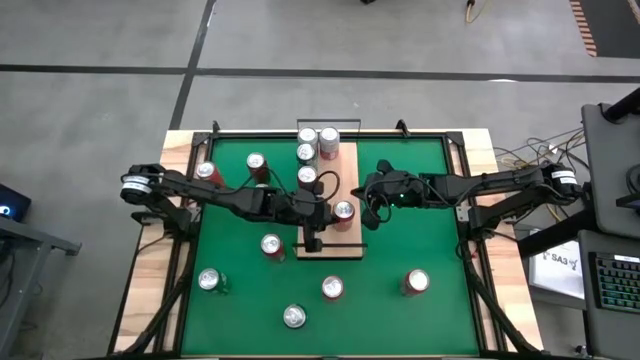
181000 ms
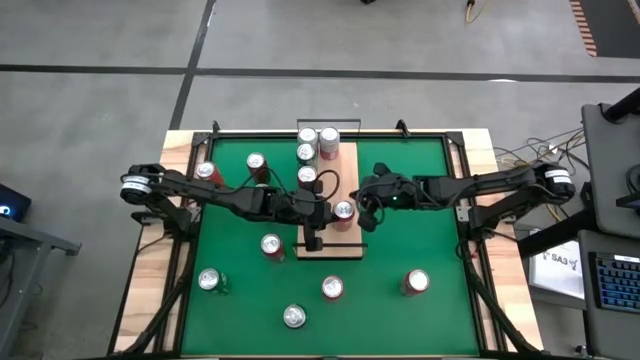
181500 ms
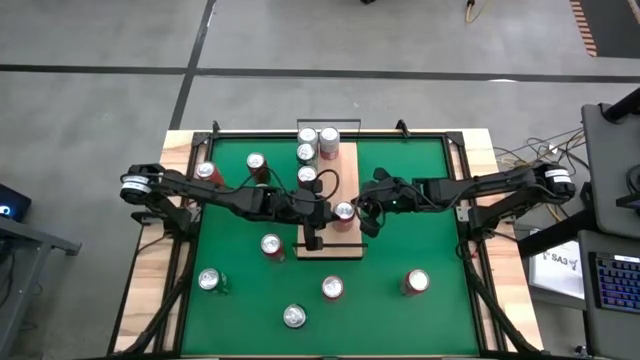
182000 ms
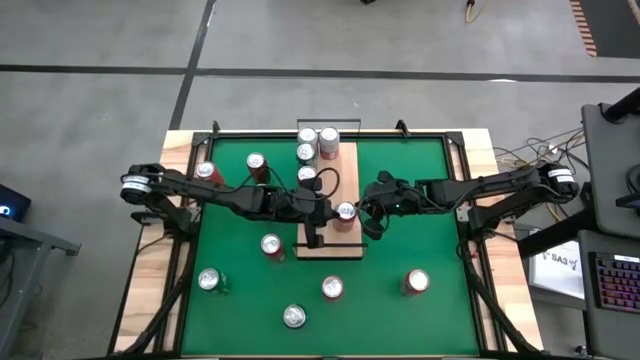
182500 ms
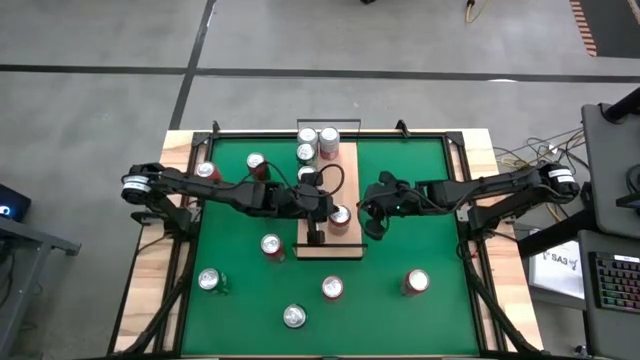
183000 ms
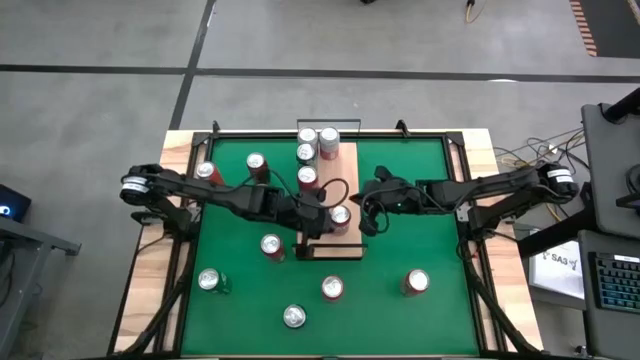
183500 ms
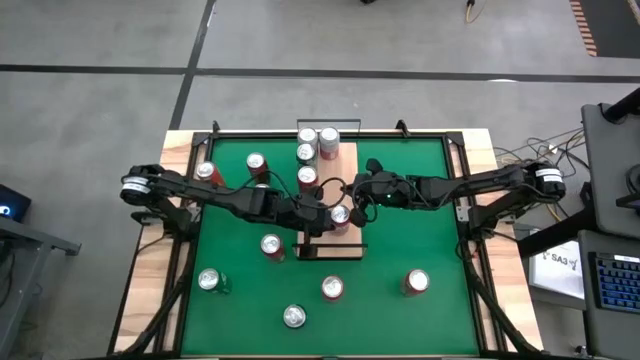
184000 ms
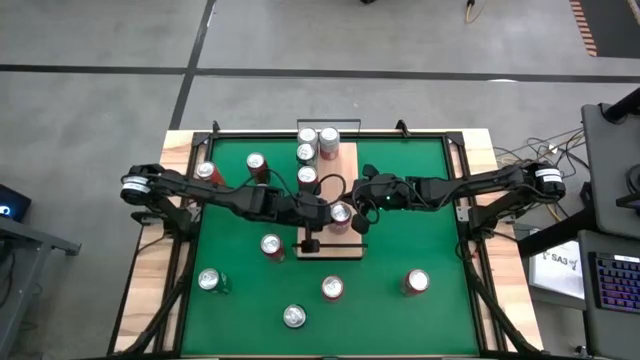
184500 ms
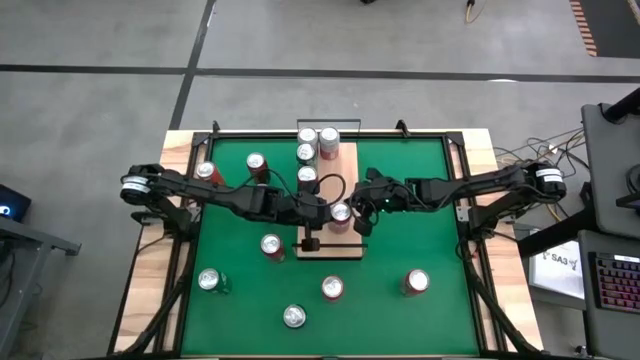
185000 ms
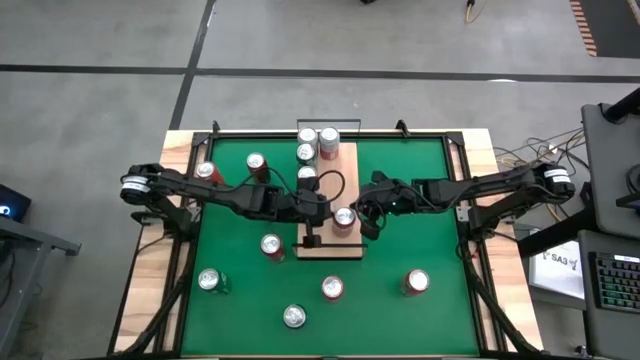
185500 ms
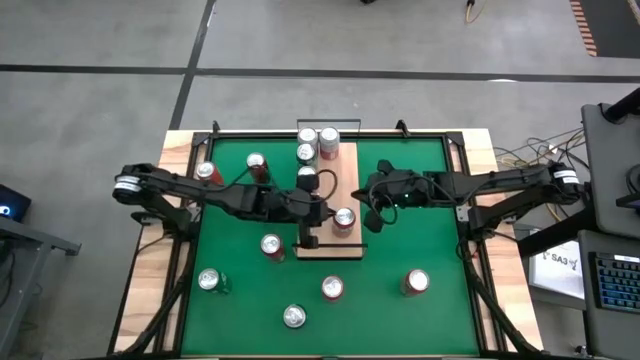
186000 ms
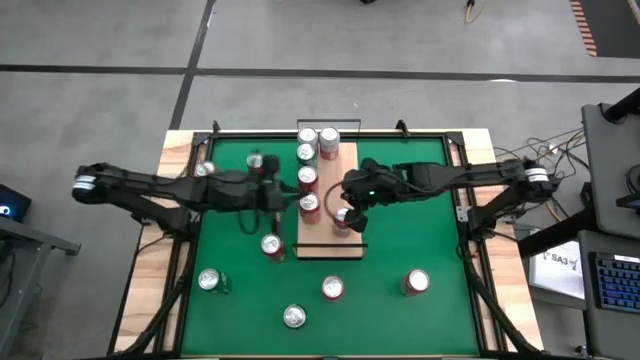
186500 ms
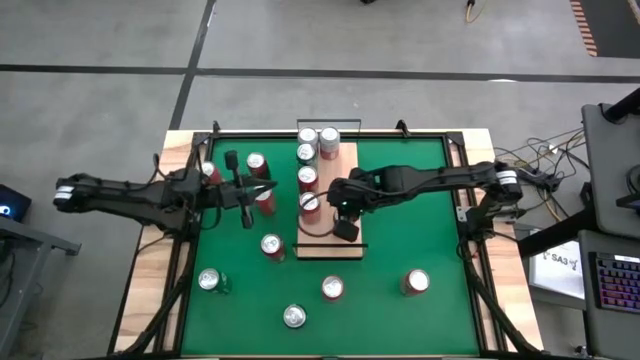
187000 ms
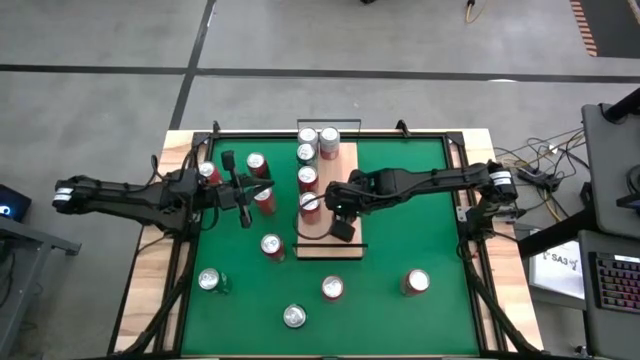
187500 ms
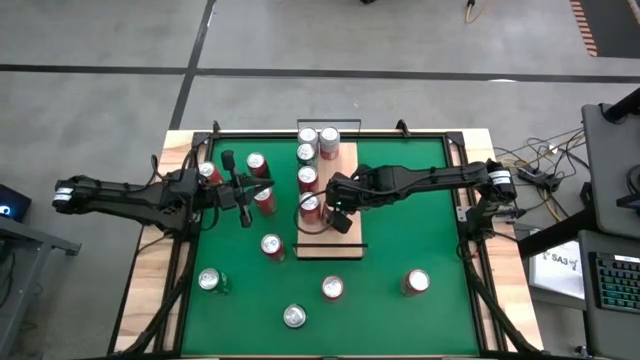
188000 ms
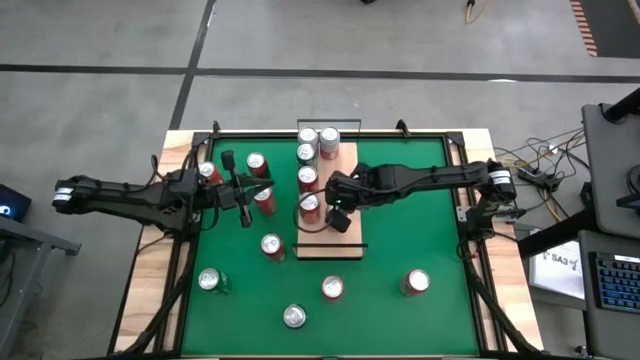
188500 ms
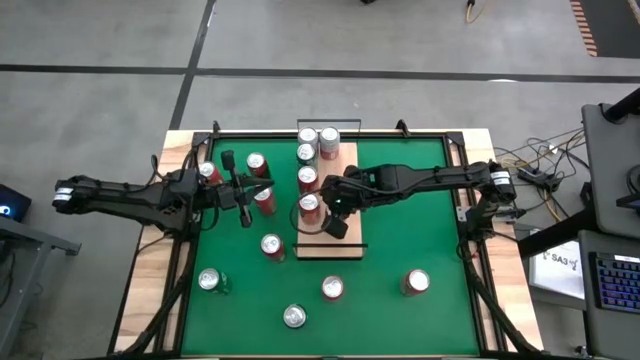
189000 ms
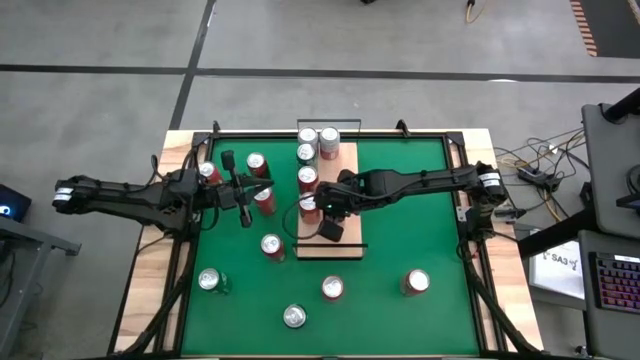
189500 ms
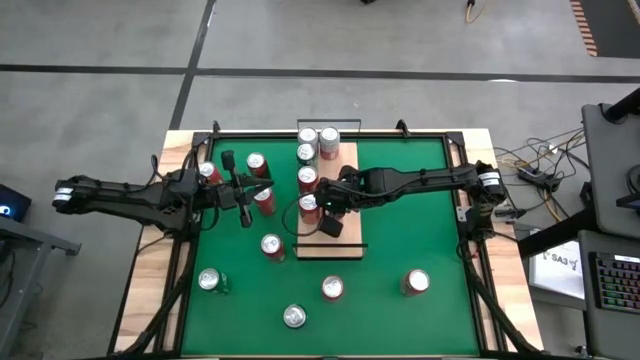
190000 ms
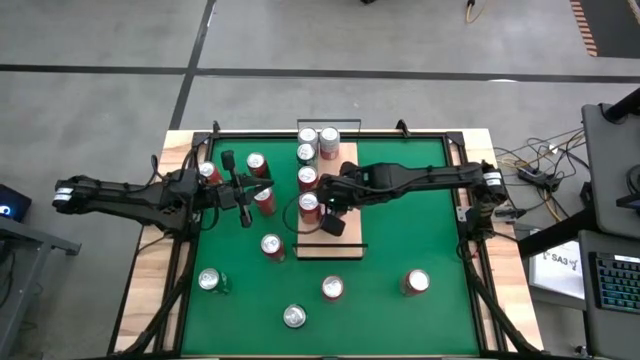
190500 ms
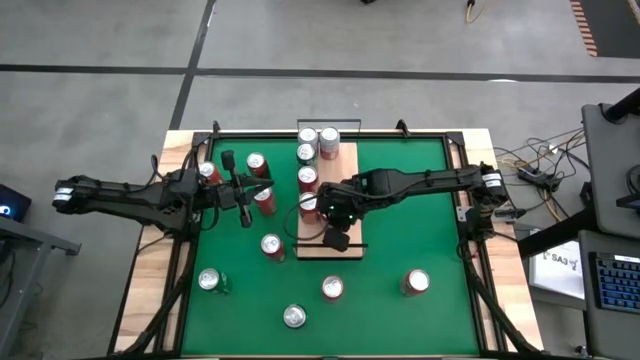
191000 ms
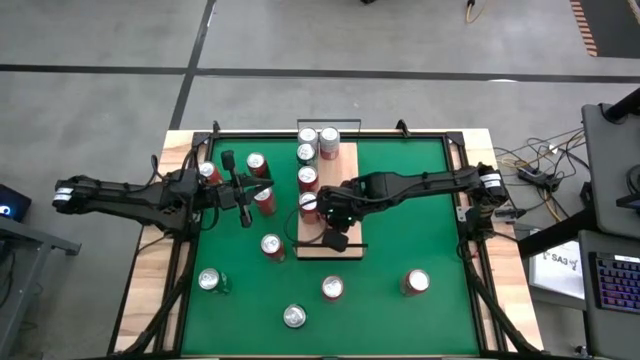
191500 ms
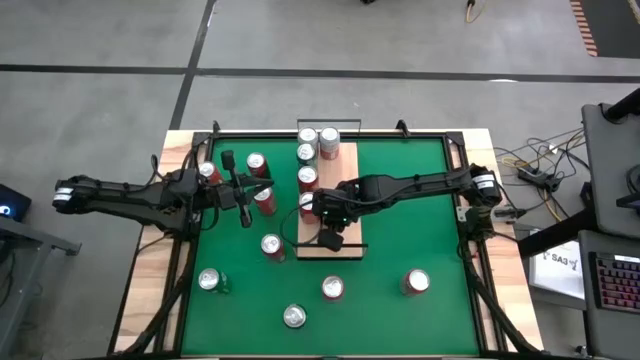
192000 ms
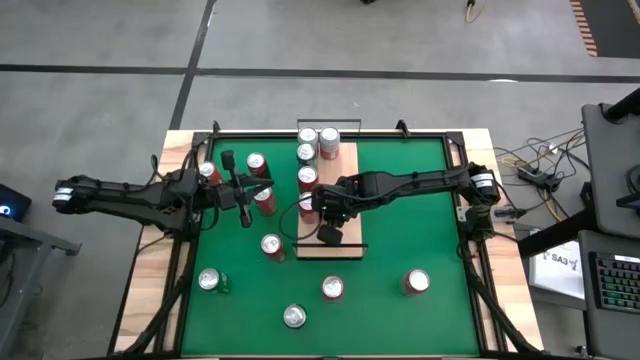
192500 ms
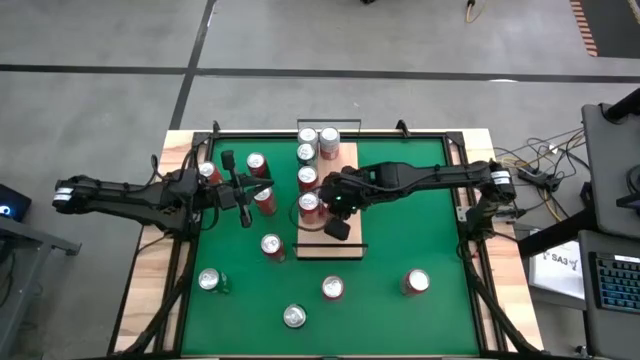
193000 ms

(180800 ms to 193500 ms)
Task: Place canned beverage on shelf
Put the orange soda can on the shelf and aligned with the other orange soda can

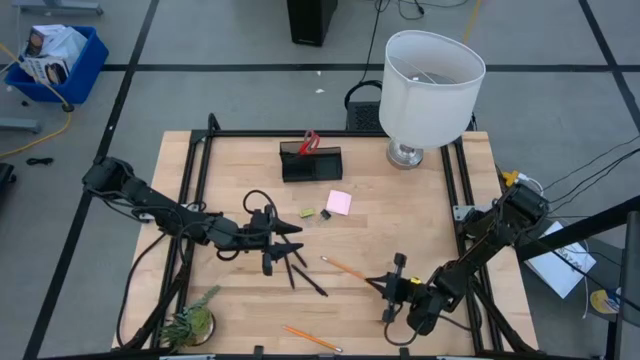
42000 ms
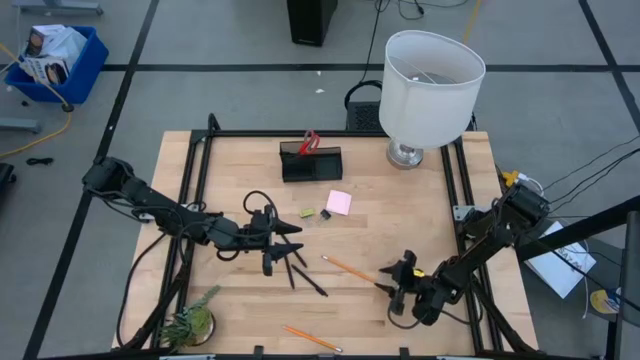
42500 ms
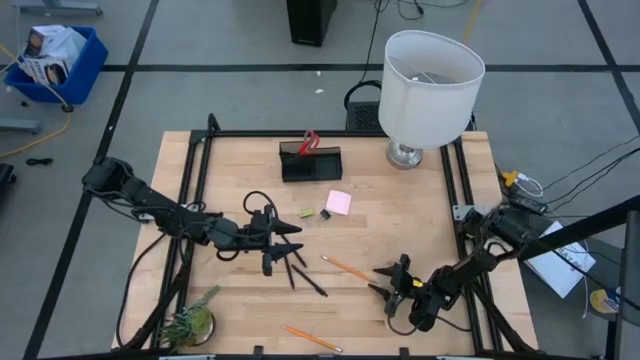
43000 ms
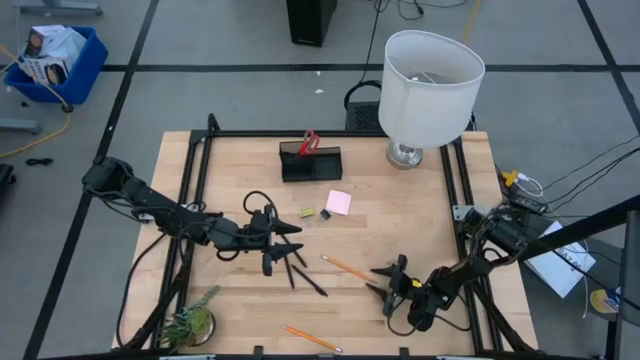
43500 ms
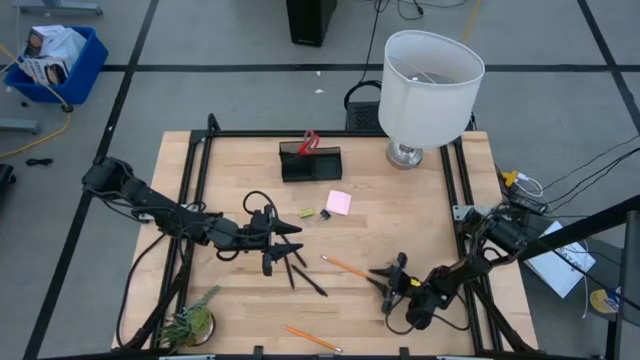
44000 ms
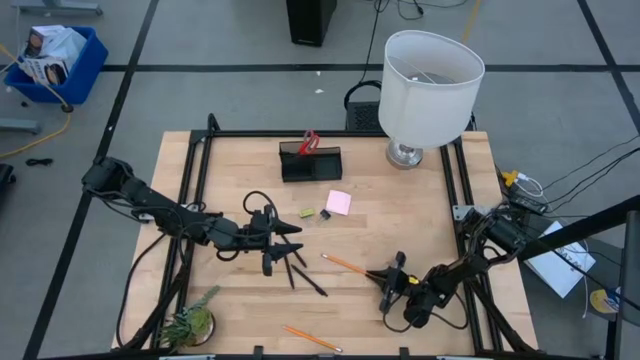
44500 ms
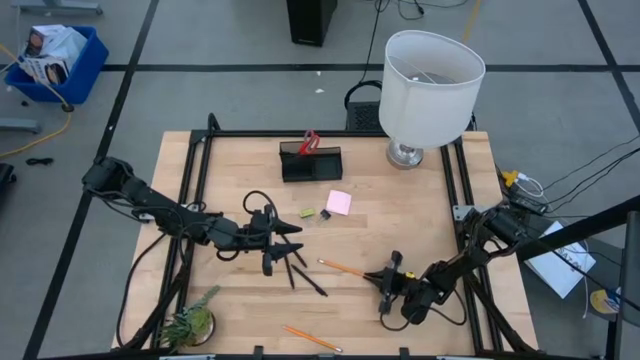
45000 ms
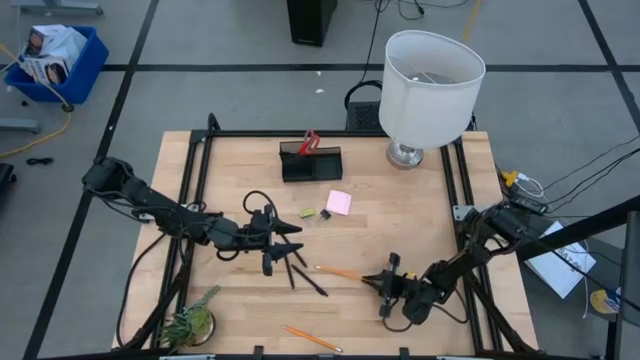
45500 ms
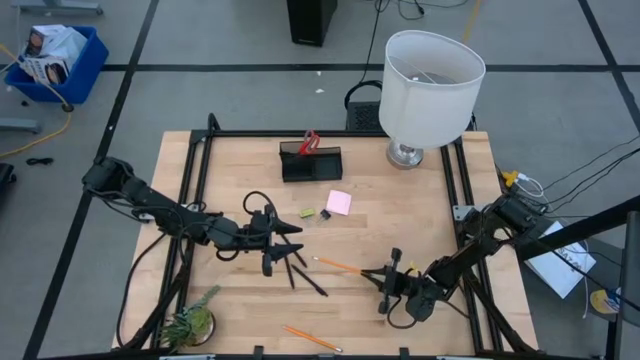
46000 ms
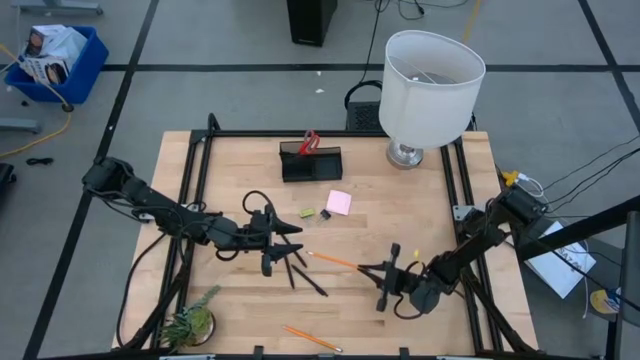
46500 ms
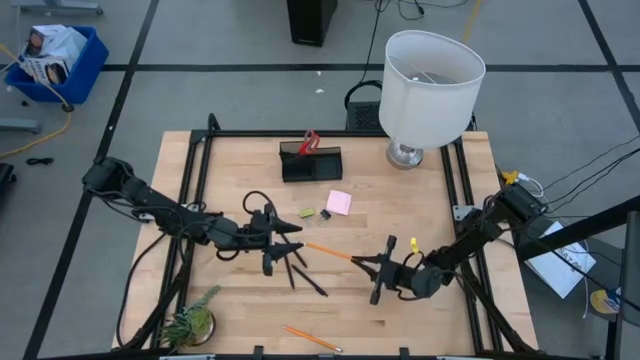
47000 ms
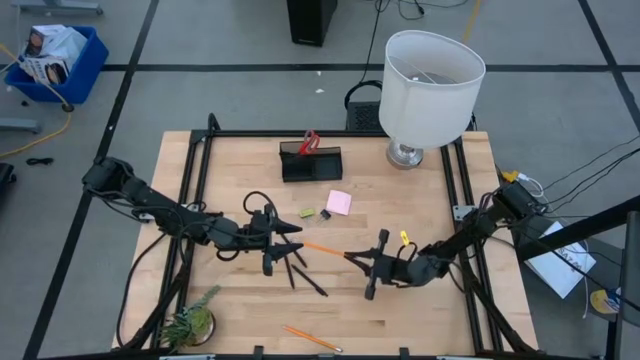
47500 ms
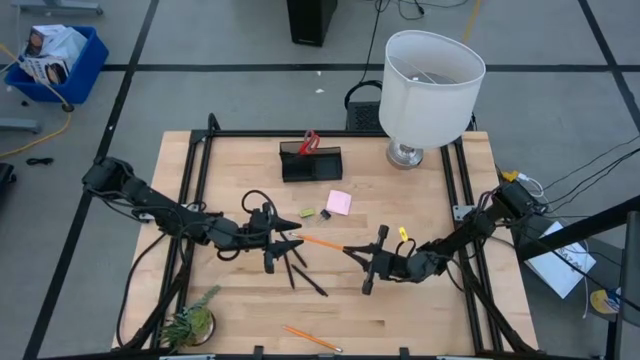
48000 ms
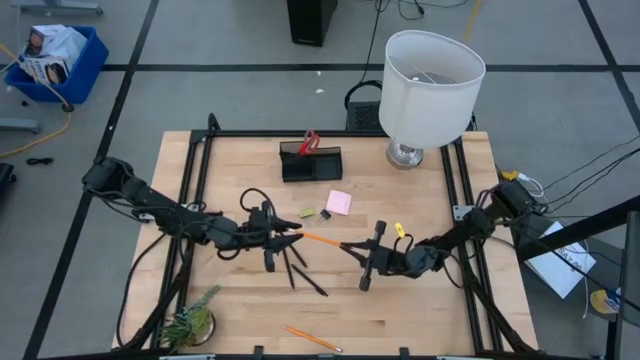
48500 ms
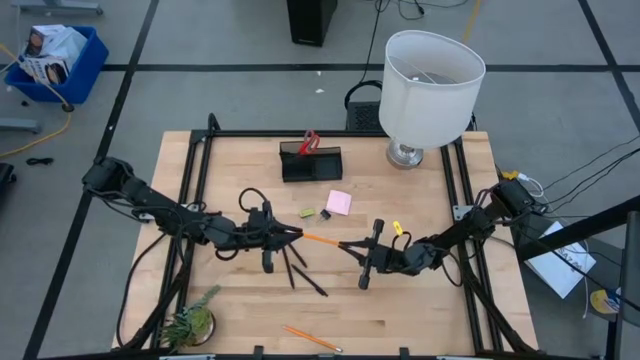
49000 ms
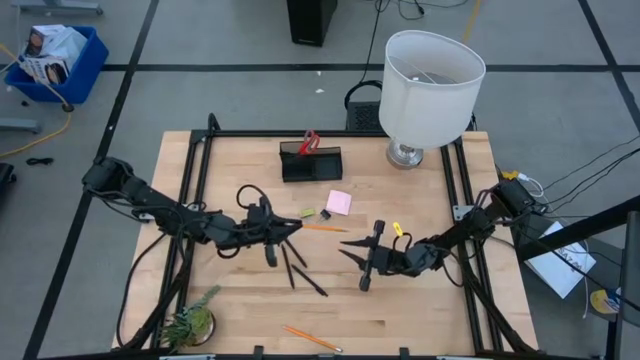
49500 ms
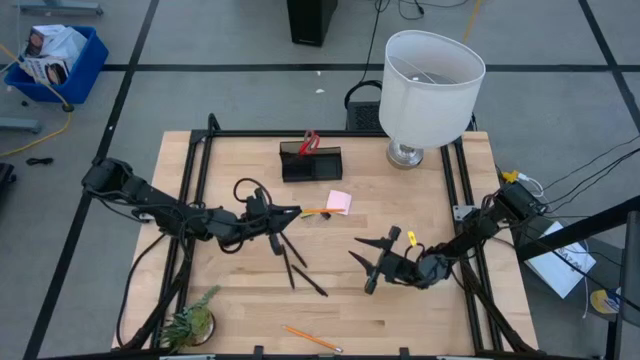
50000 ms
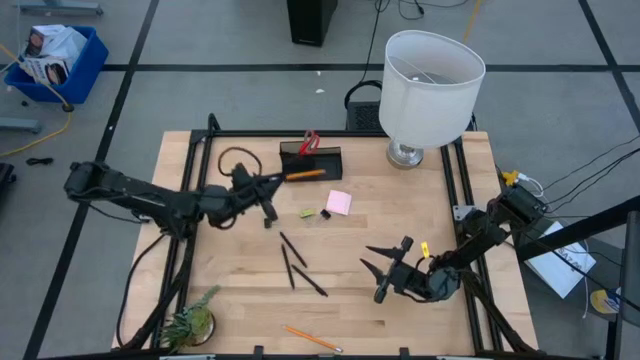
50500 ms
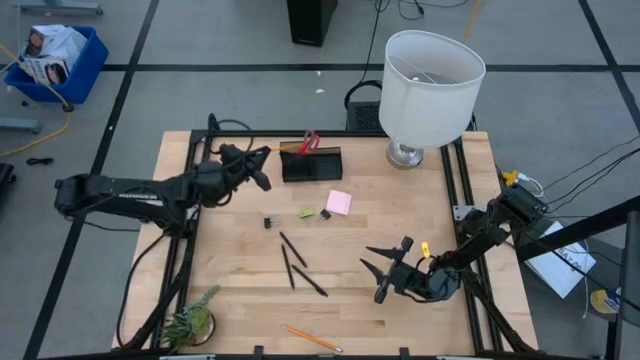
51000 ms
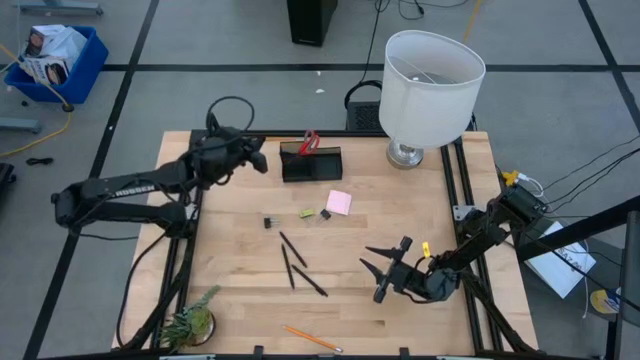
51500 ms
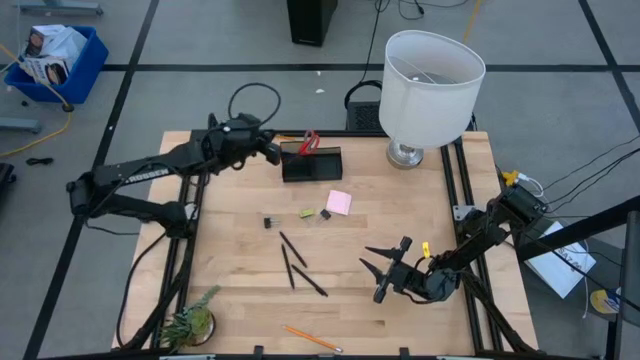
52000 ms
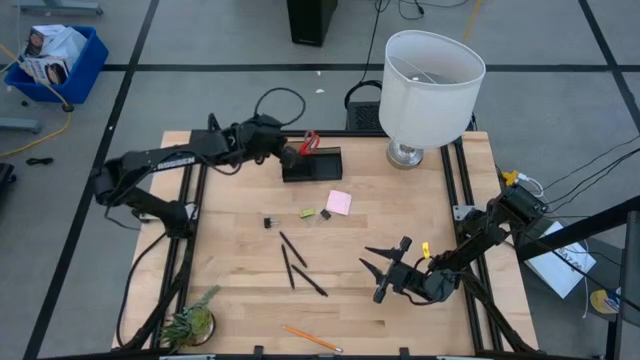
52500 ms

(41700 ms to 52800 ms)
Task: Pick and place office supplies into organizer
Put the yellow pencil into the black desk organizer
